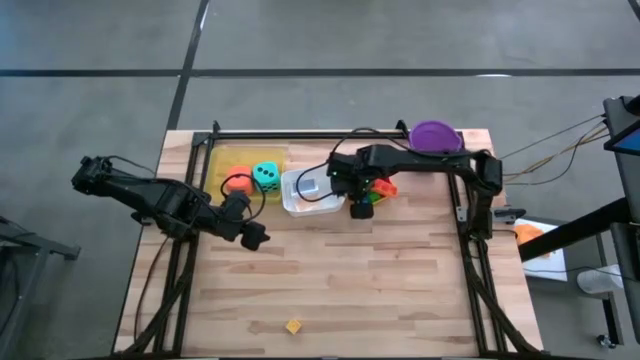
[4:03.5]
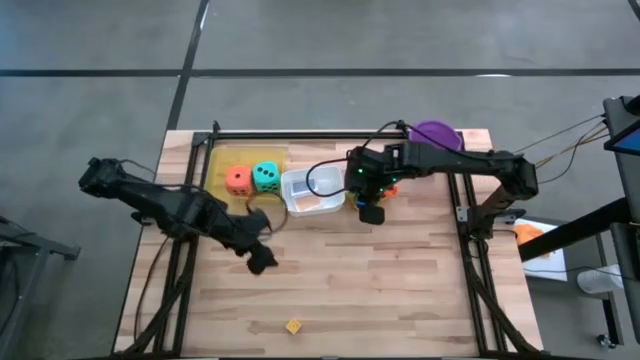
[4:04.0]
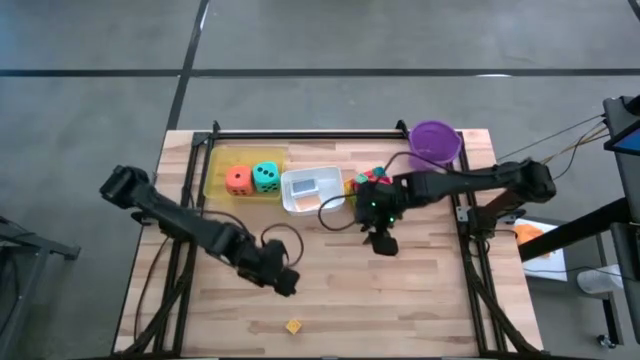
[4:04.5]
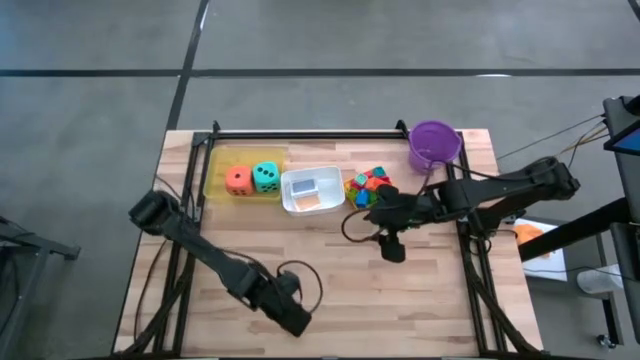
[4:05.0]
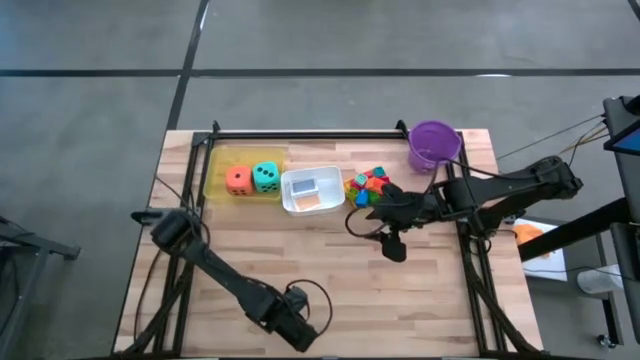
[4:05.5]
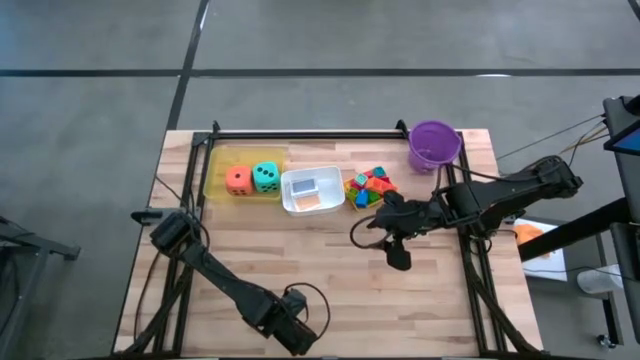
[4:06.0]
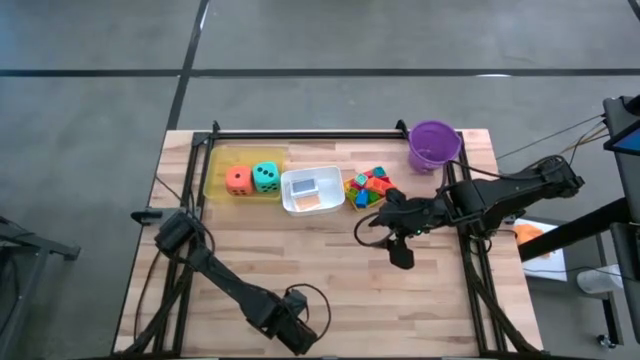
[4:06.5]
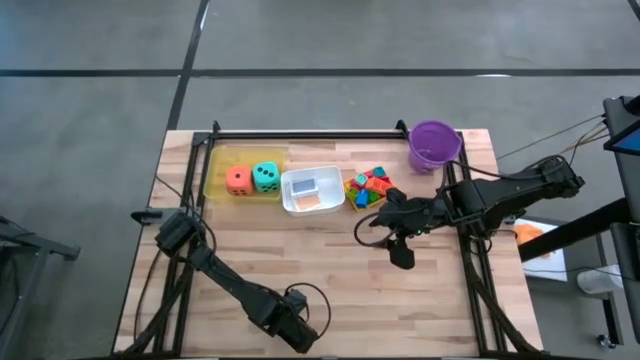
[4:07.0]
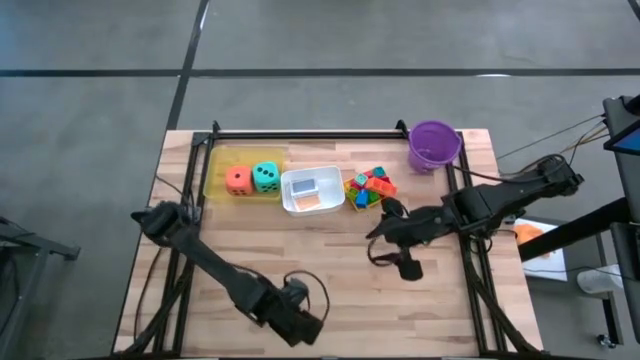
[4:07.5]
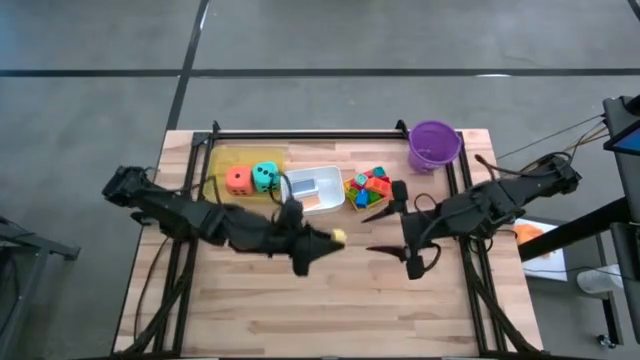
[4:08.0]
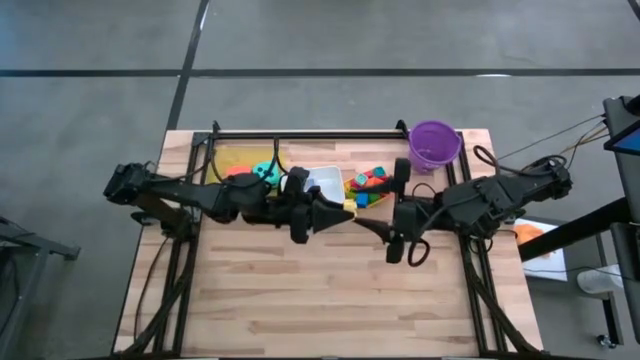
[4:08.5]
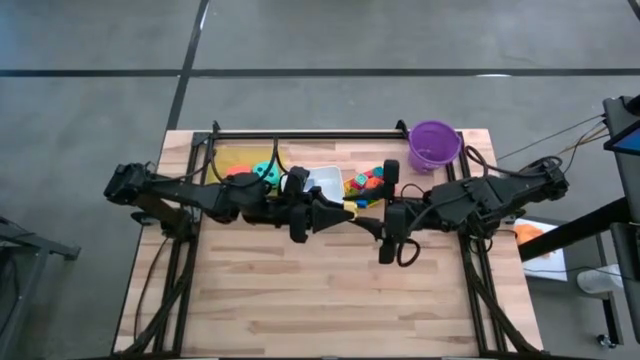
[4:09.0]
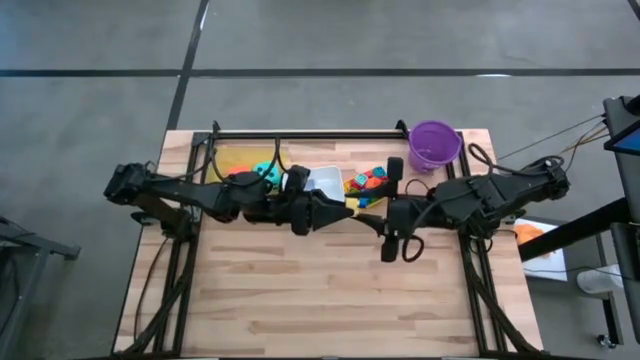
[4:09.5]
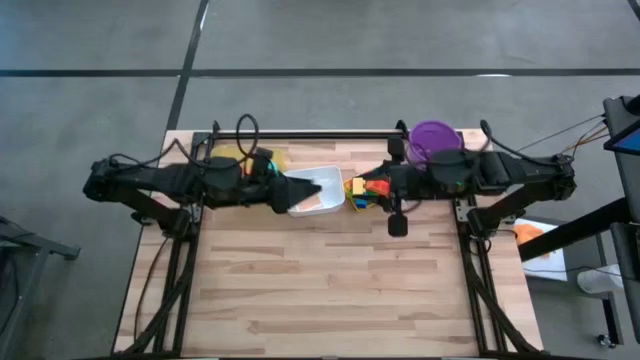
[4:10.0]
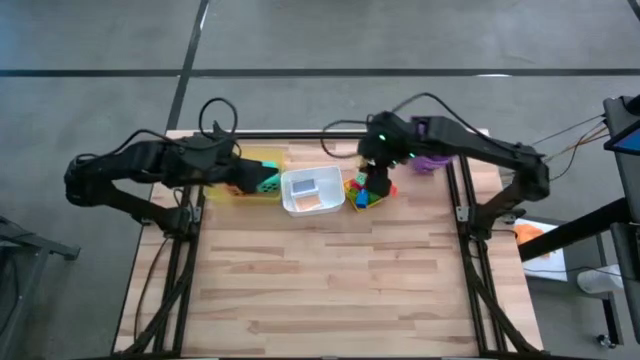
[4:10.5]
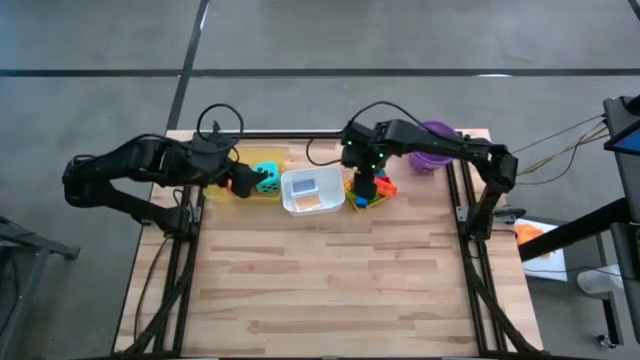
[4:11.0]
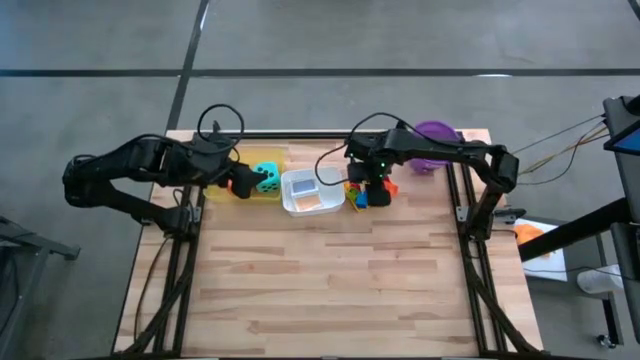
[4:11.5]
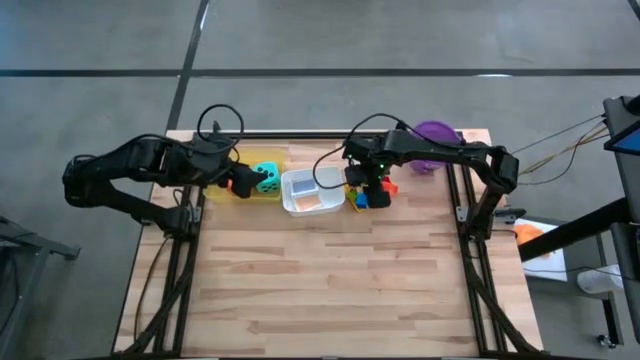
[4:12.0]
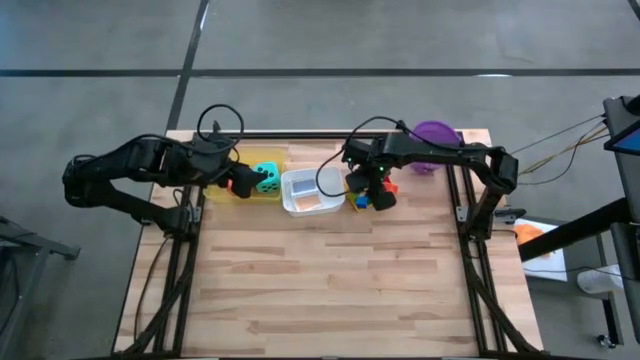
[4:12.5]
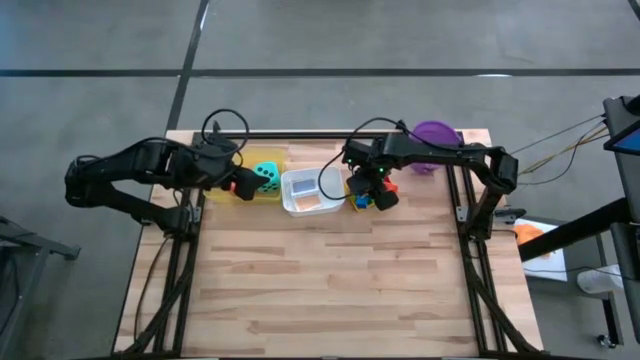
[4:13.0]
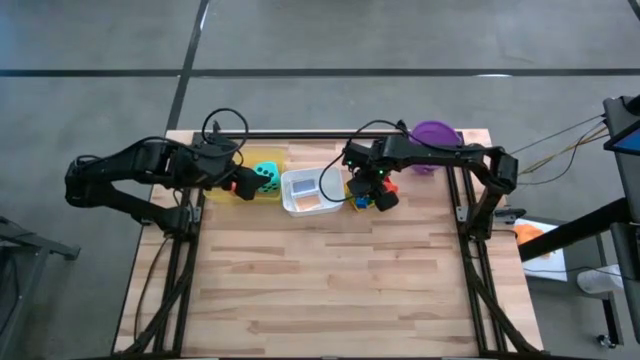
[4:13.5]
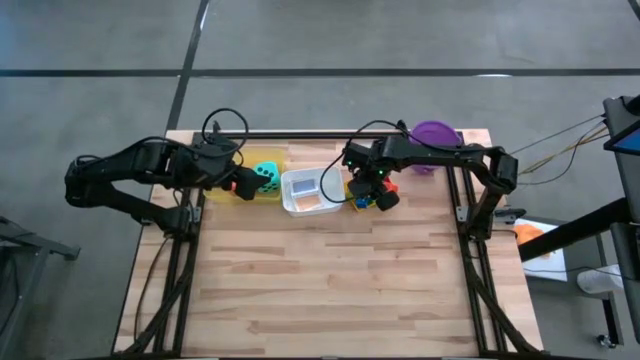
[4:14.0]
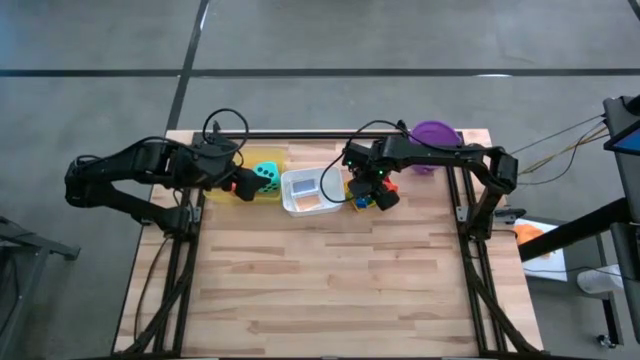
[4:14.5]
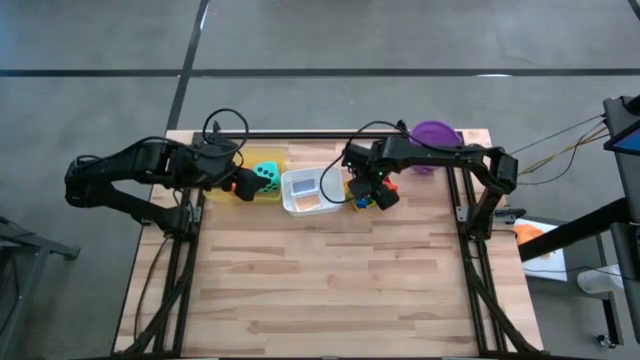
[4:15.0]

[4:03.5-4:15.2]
Task: Pick & Place Toys
Put the light yellow game piece into the yellow bin

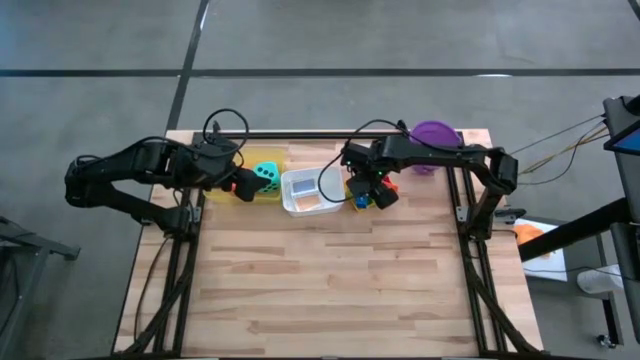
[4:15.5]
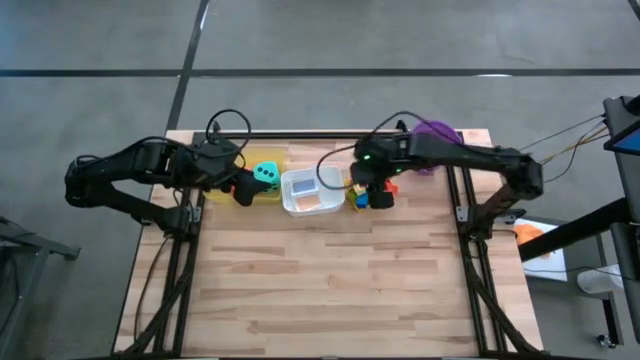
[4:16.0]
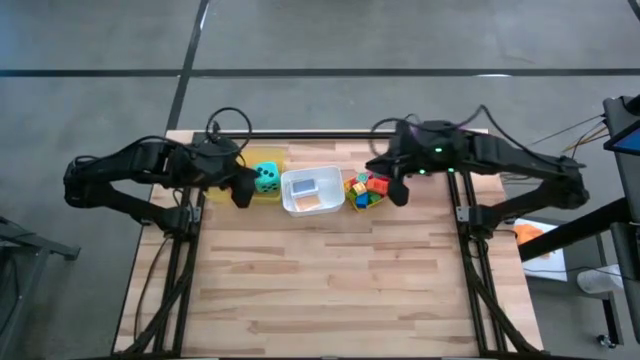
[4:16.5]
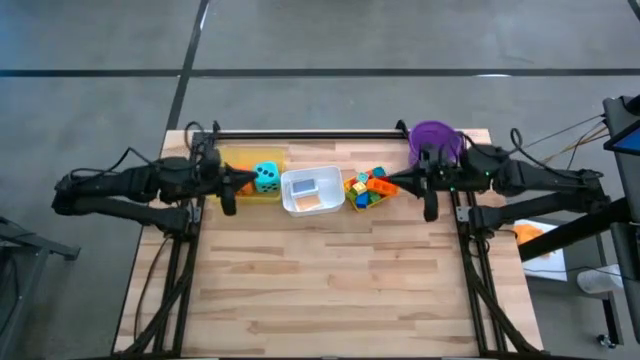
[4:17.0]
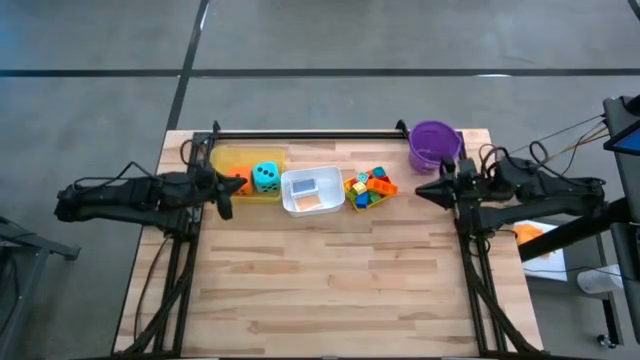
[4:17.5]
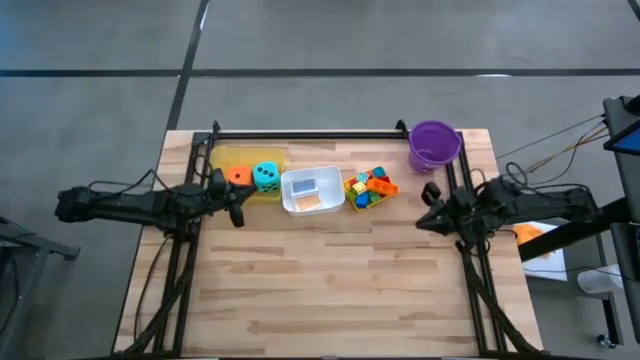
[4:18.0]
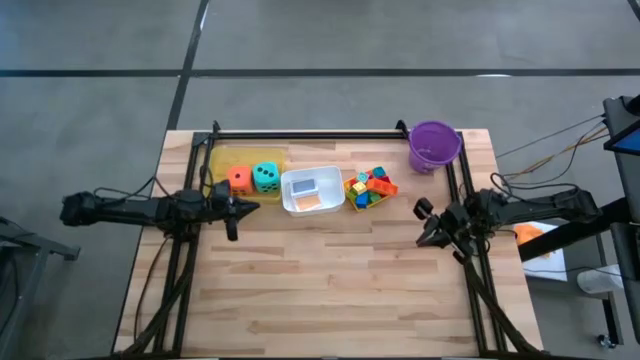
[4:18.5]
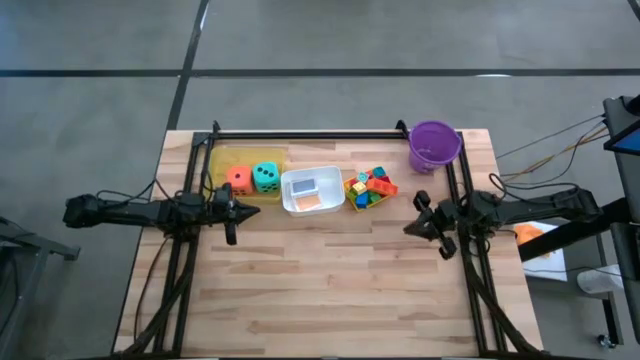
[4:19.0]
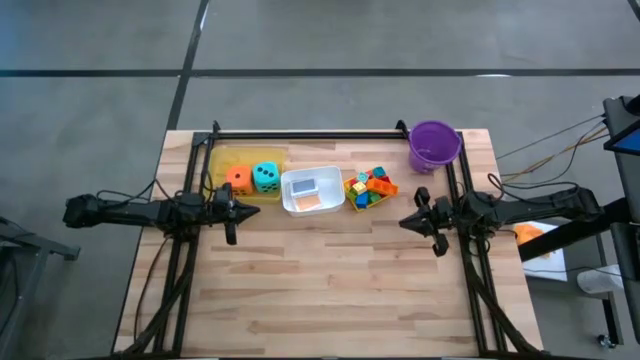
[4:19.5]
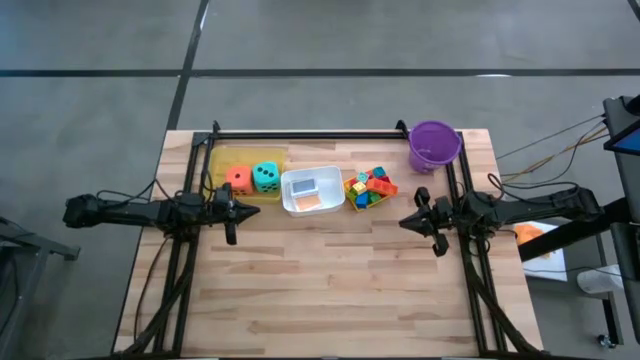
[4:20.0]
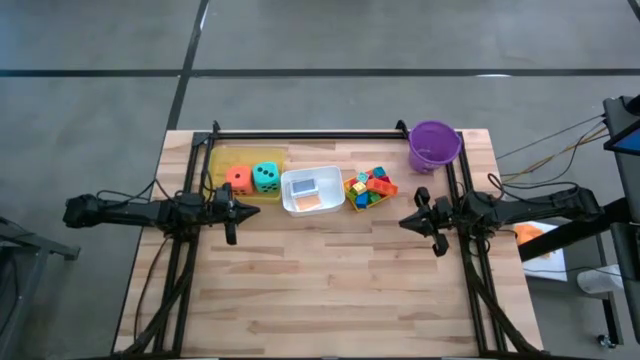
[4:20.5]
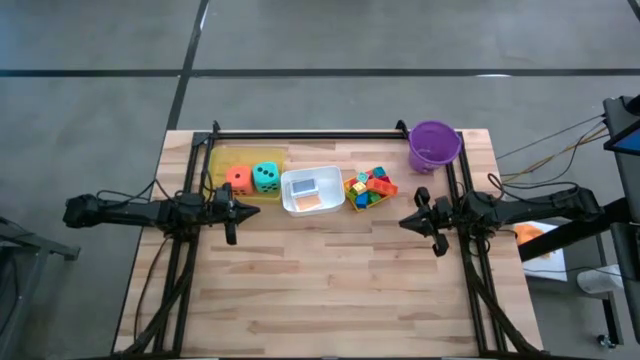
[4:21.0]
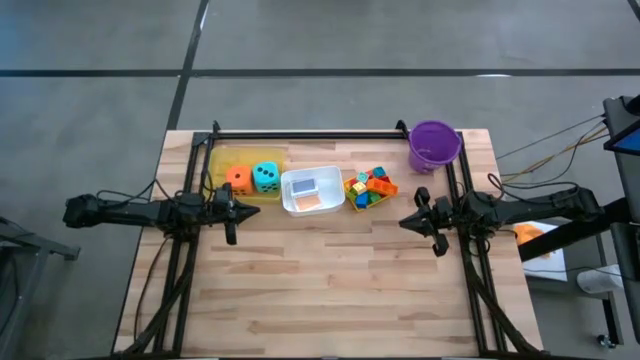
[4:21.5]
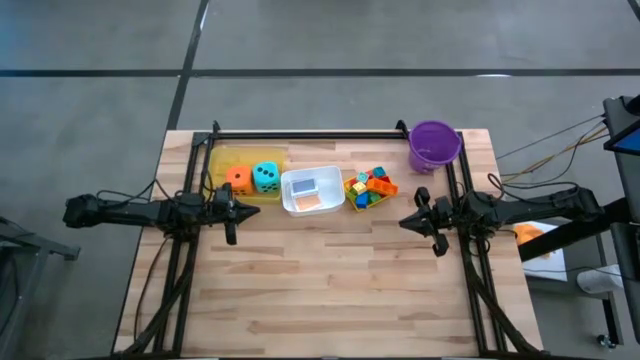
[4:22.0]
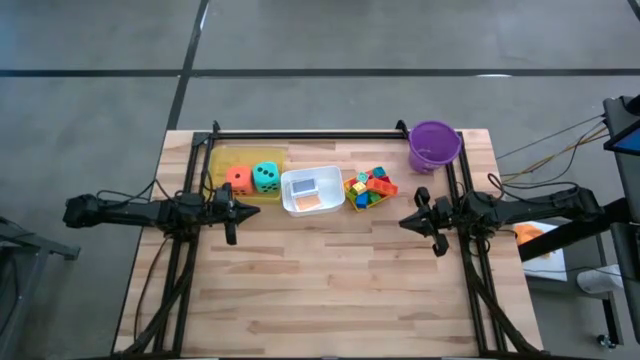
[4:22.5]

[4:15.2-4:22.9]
Return to Home Position

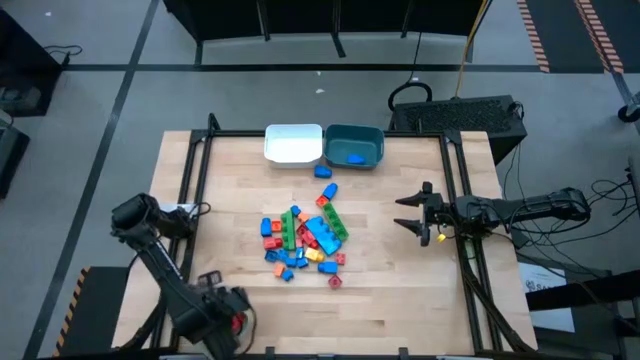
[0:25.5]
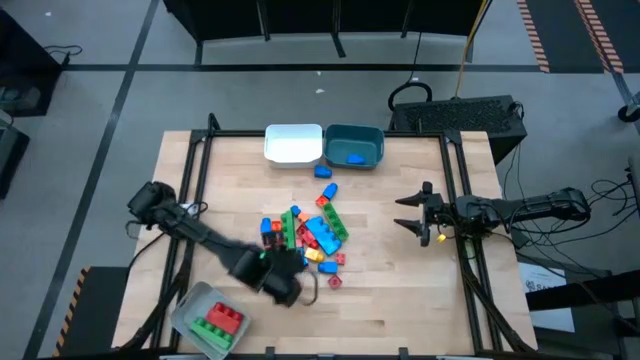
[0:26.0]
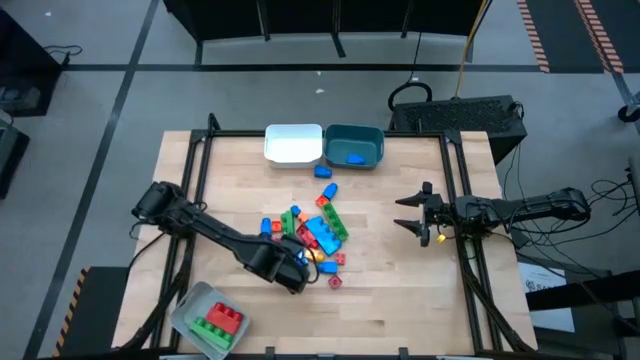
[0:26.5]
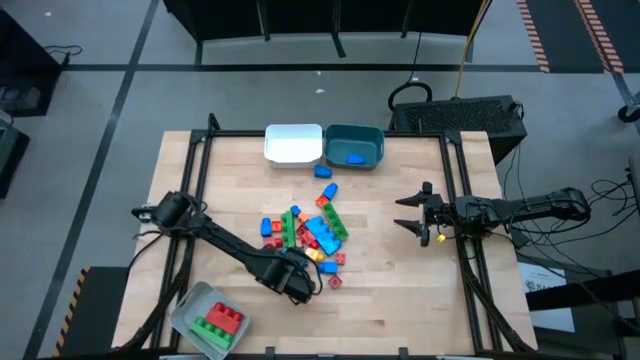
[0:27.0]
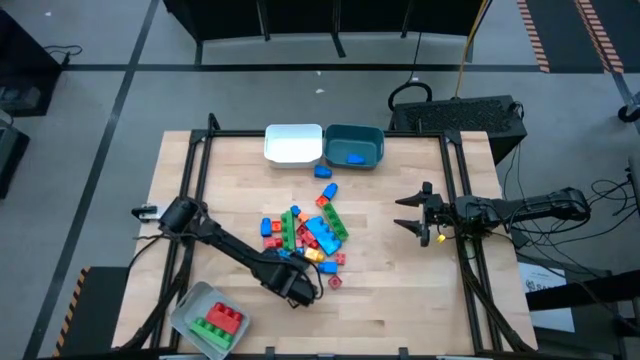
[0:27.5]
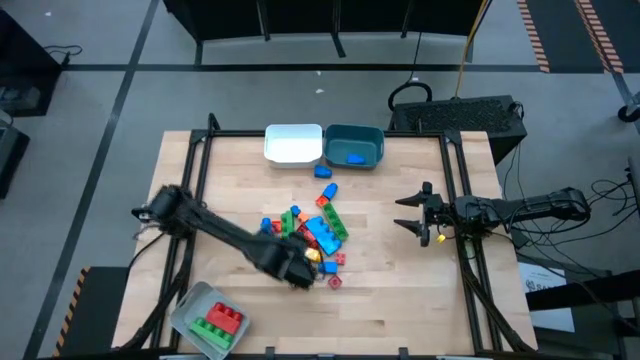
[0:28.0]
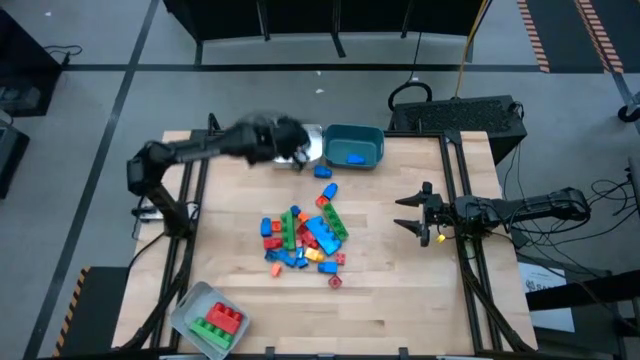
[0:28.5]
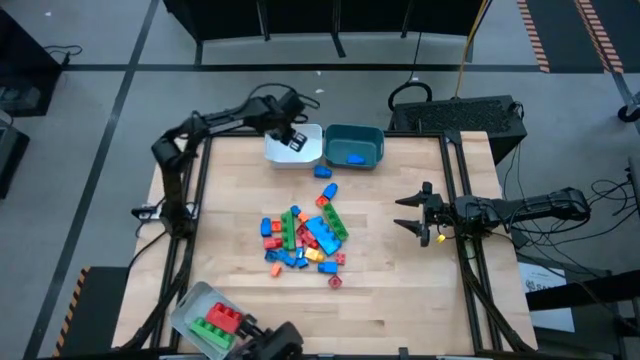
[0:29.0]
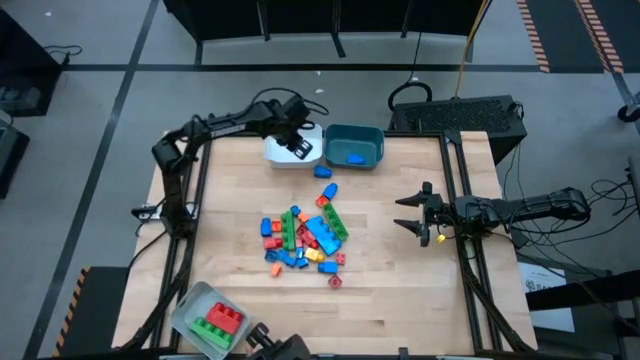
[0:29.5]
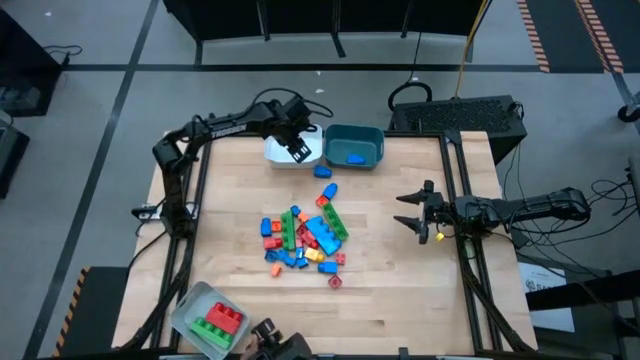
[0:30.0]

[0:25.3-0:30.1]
Task: Sort blocks by size
Put the blue cube 4 stud game piece into the white bin
